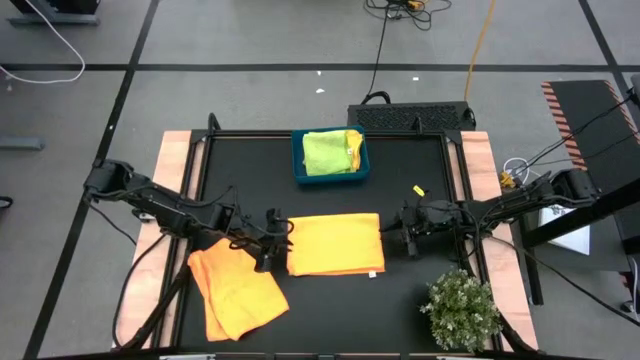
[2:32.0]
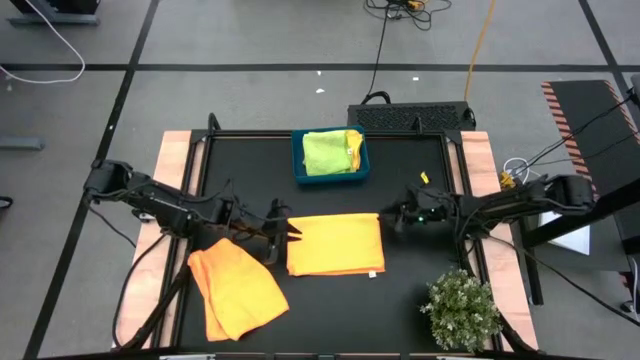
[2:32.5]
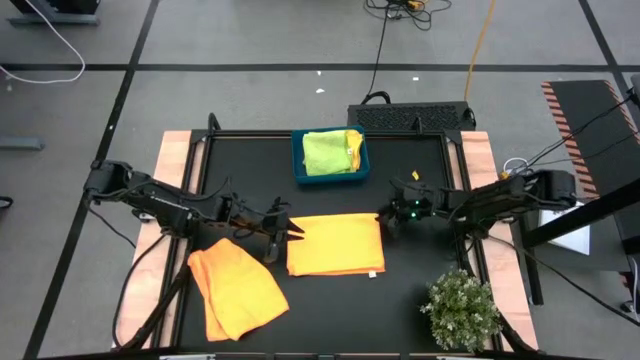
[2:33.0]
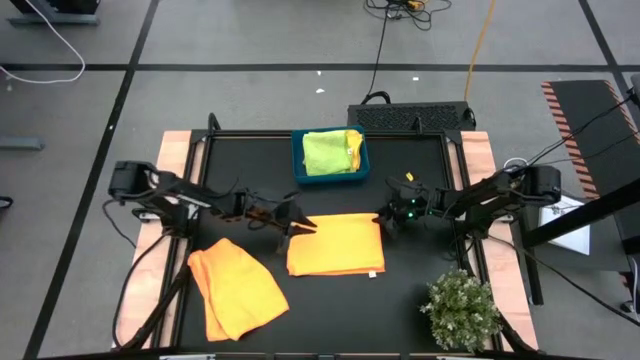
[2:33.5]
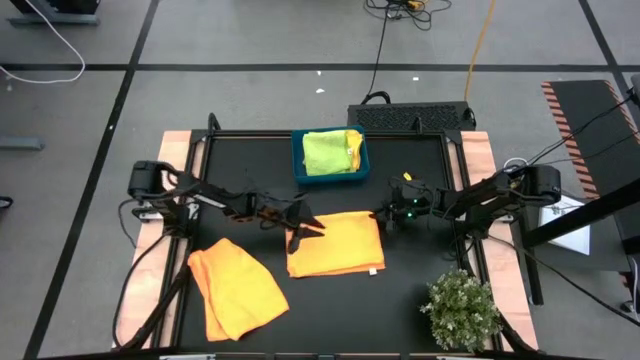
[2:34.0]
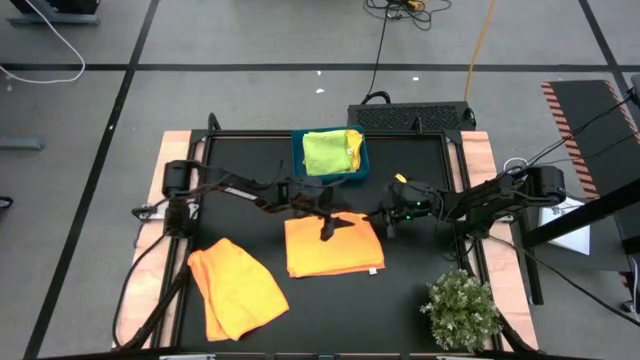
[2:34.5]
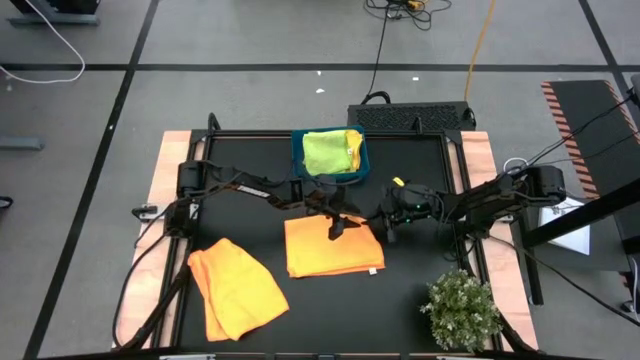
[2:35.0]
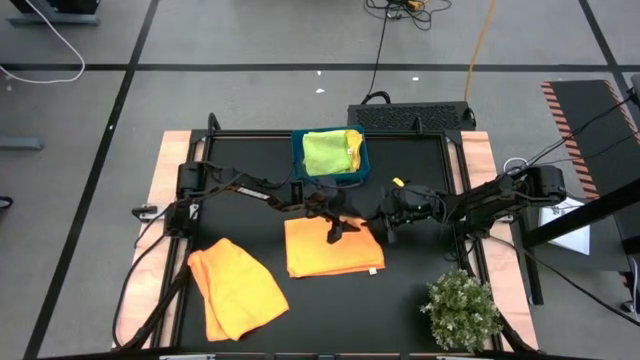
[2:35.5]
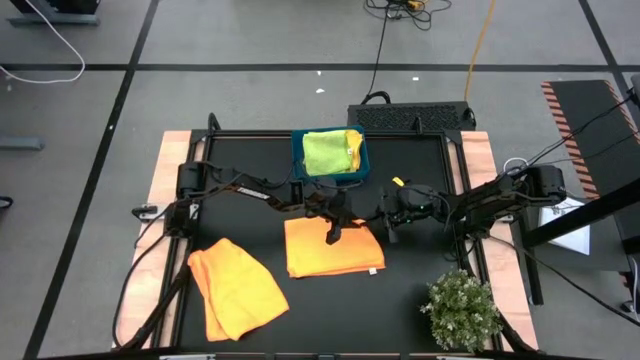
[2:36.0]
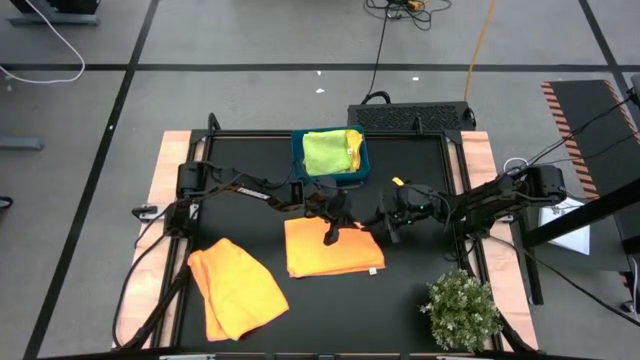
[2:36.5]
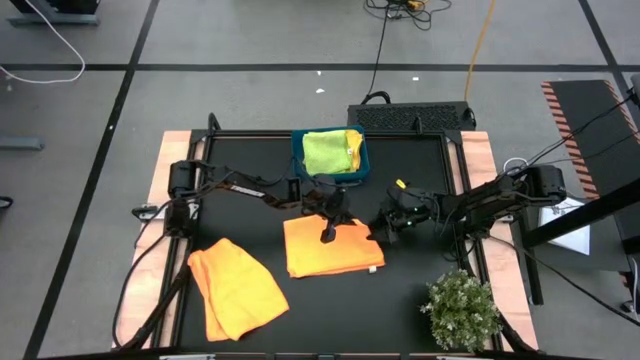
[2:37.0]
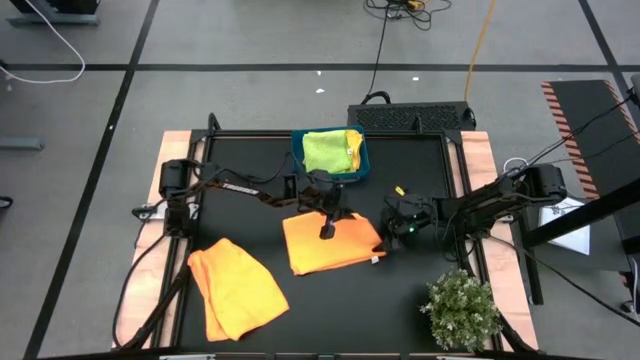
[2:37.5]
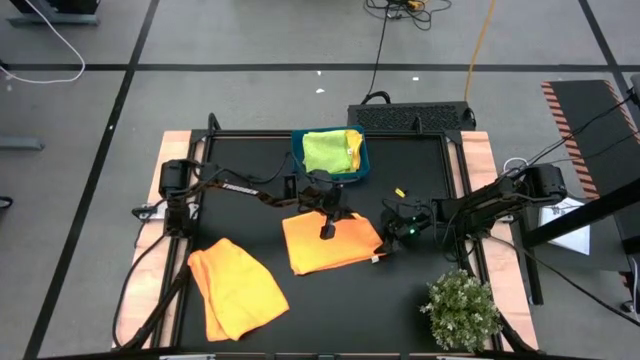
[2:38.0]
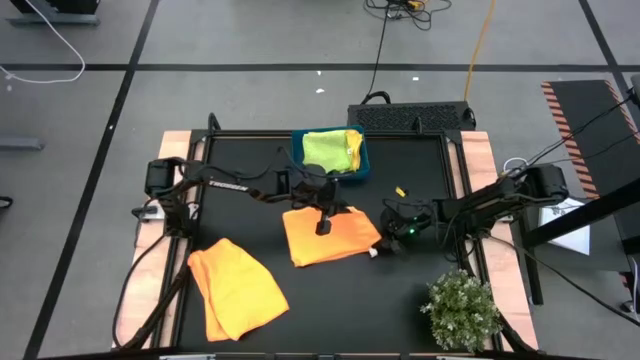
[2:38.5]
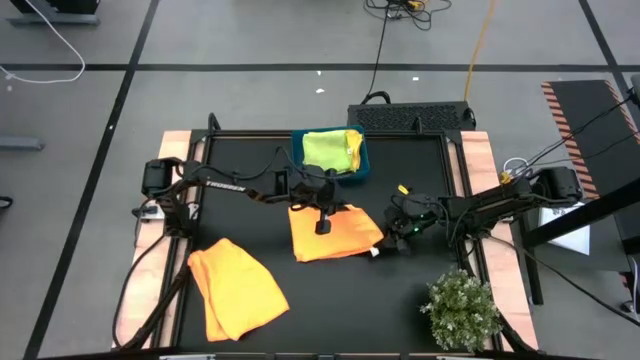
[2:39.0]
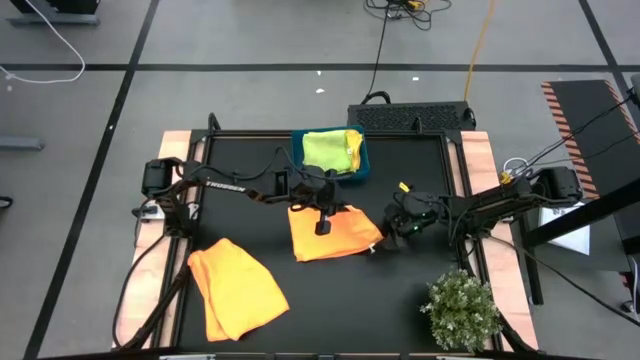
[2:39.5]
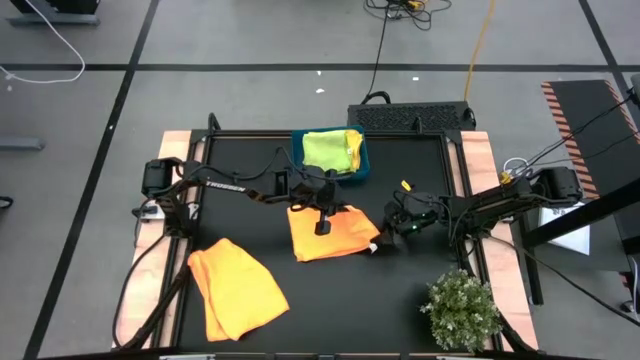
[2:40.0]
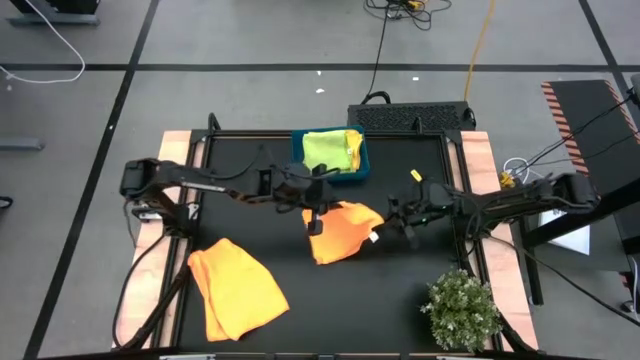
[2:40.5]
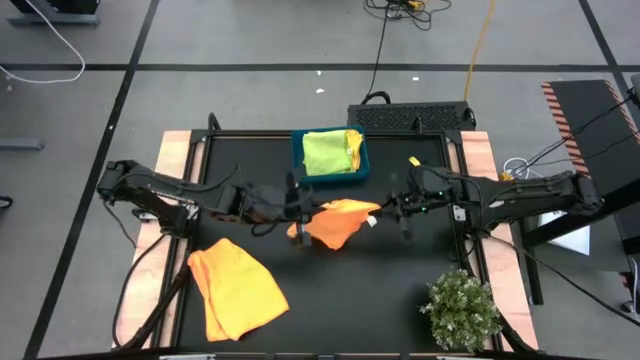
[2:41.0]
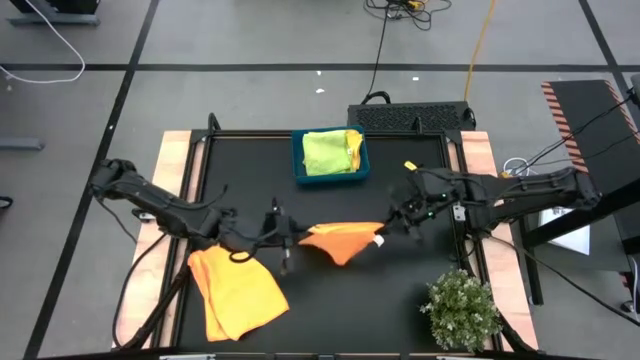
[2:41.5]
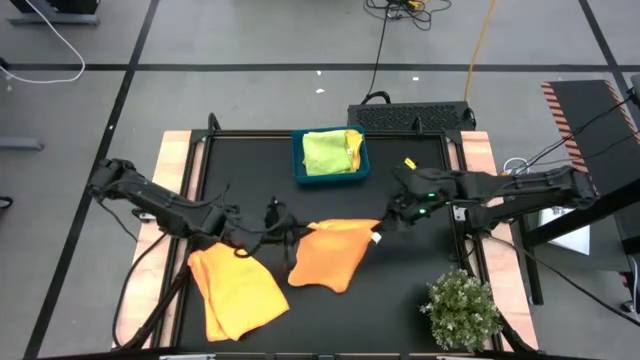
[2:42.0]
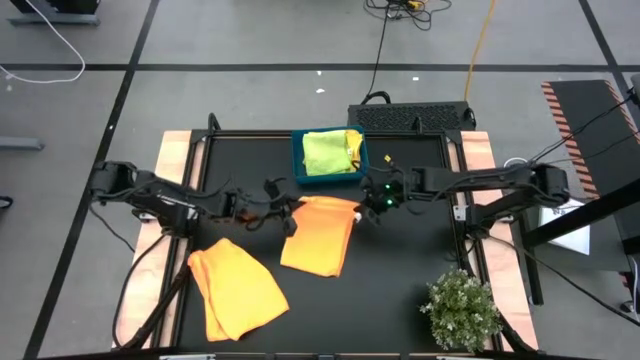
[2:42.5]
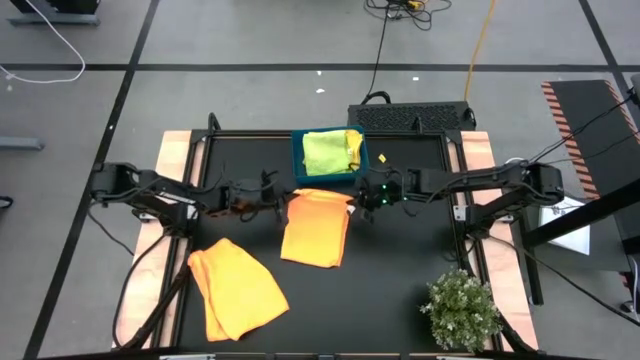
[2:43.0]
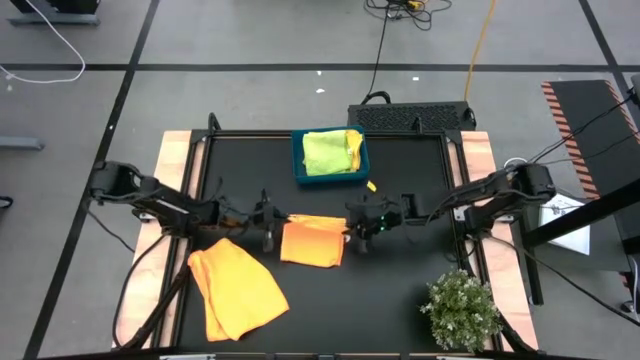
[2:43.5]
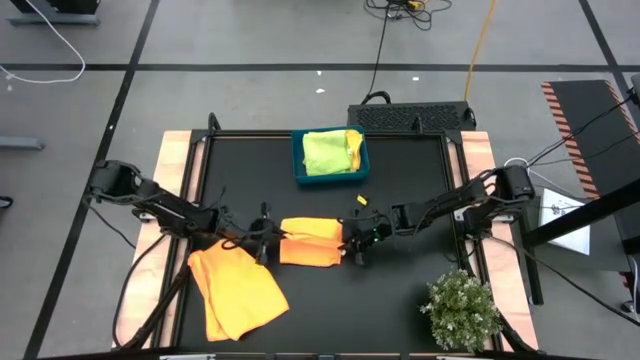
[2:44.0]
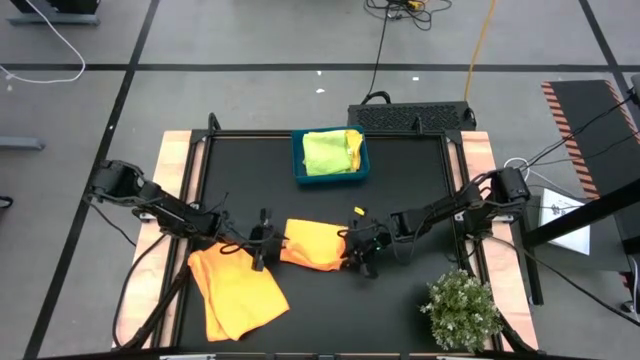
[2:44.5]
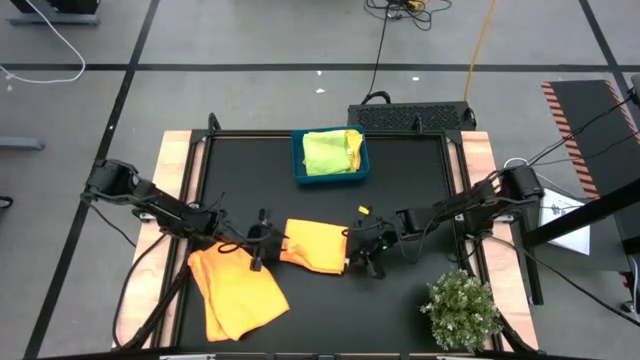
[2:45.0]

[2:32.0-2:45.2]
Task: Fold microfiber towels
Fold the right orange microfiber towel

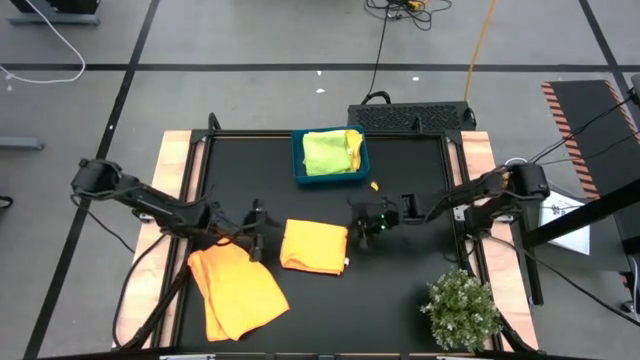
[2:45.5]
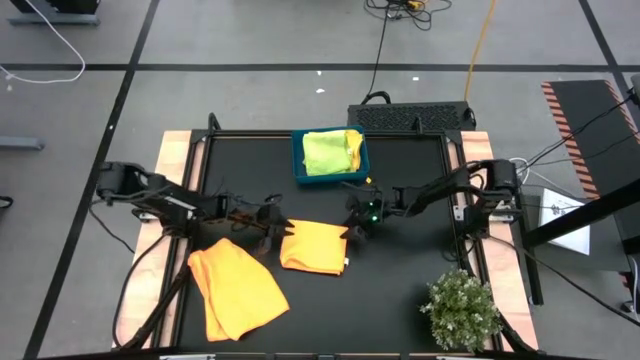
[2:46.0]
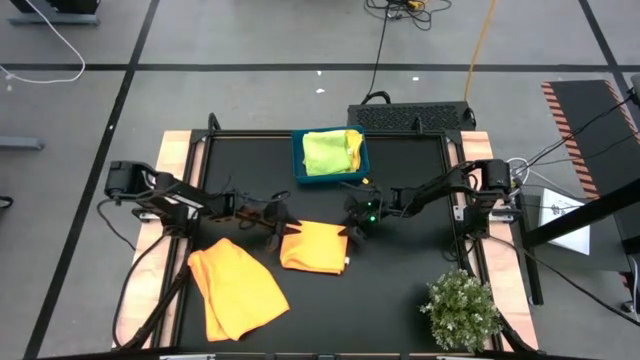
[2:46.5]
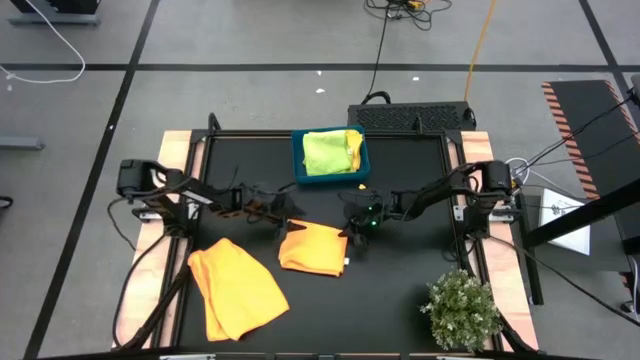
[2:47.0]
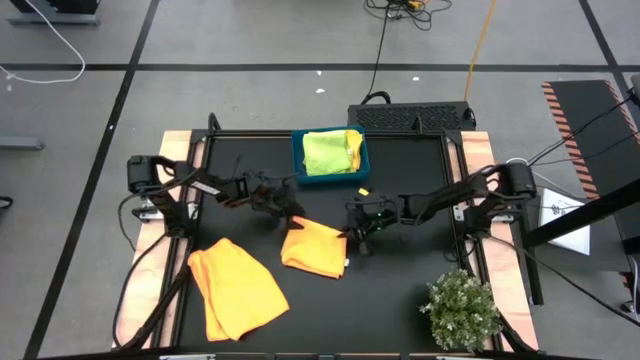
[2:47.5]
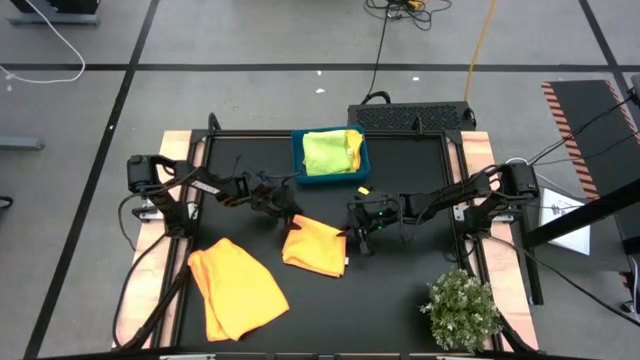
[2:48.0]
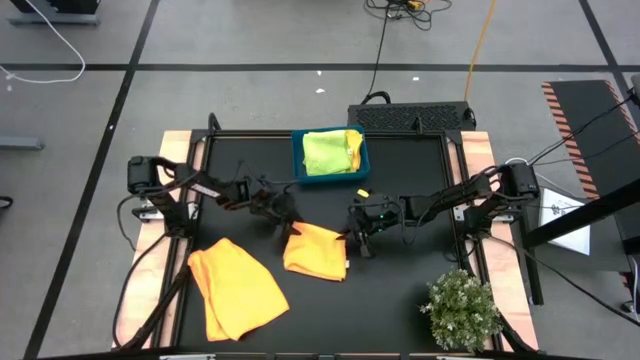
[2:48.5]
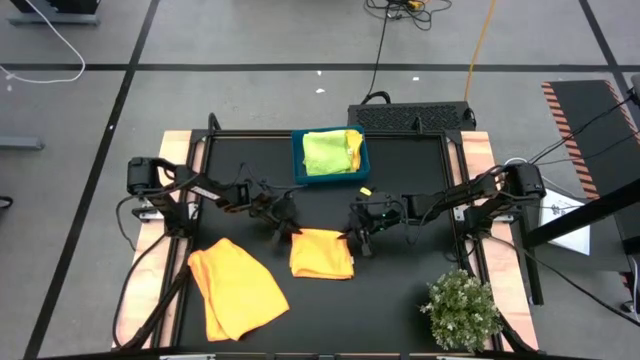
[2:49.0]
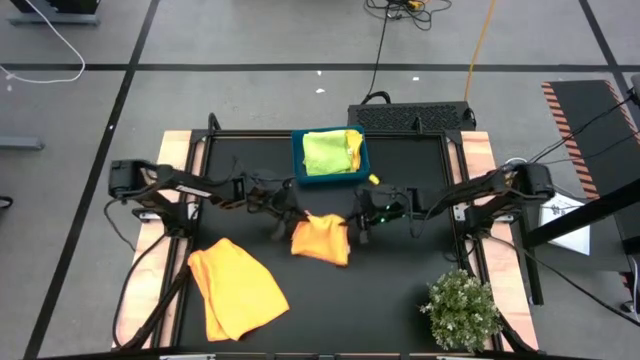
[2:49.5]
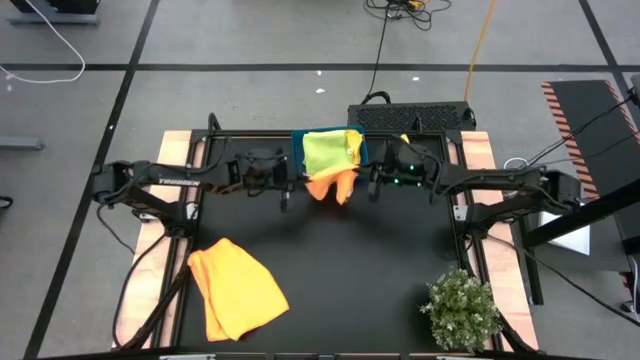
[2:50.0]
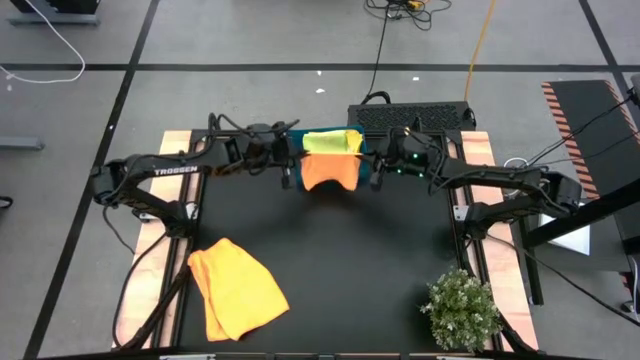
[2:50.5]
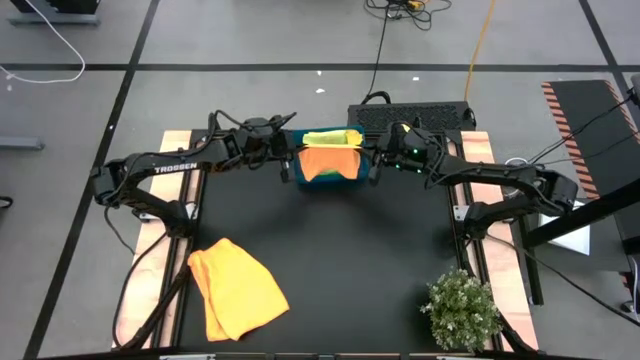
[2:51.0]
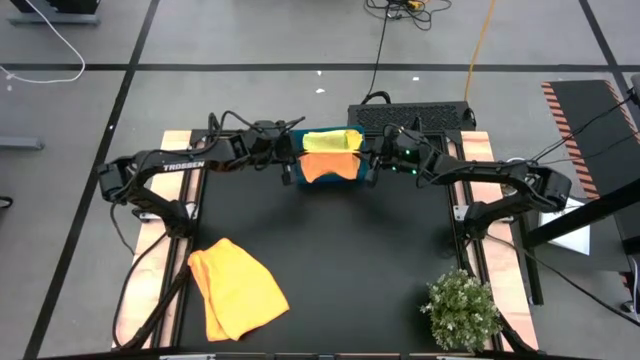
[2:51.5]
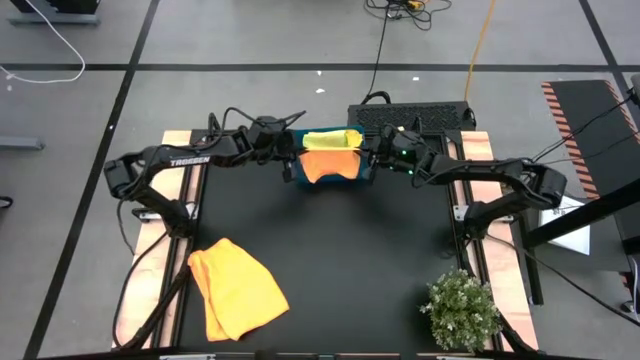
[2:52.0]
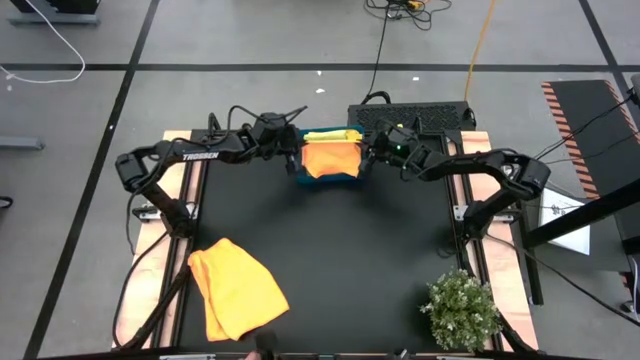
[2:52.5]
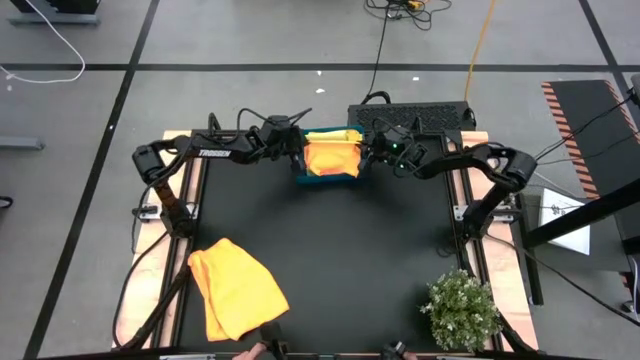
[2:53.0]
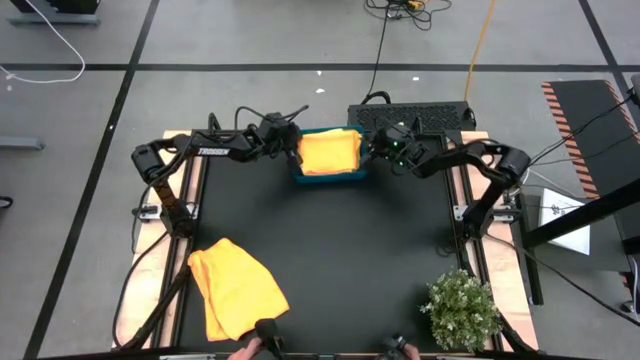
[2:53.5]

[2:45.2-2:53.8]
Put the folded orange microfiber towel into the blue bin

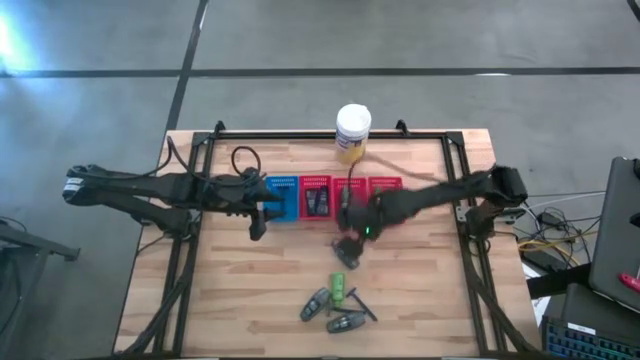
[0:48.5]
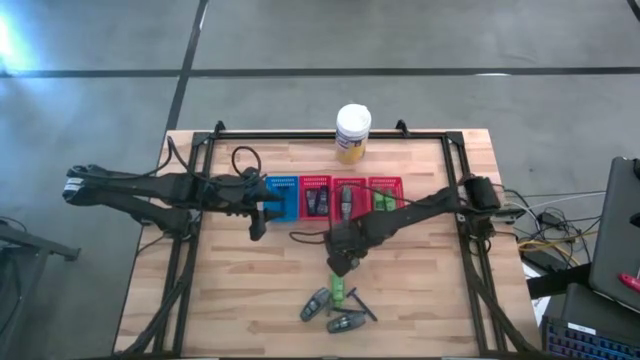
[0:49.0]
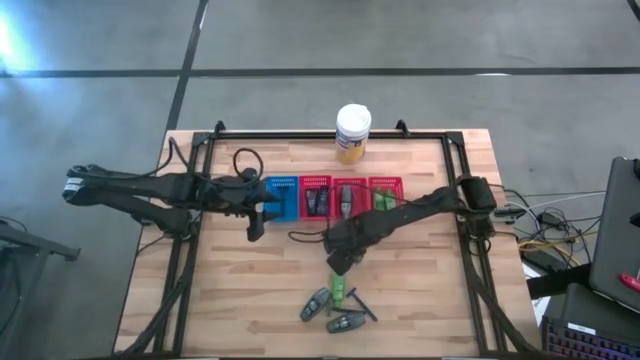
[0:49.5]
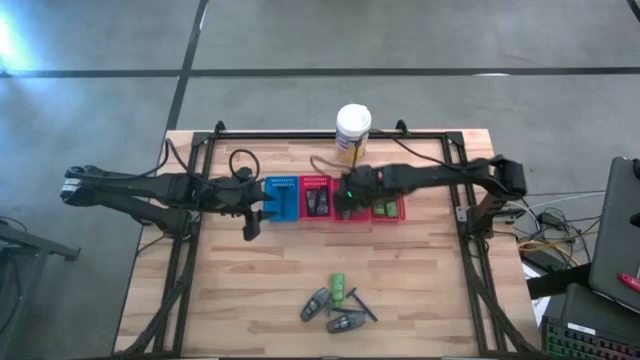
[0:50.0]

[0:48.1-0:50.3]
Task: Pick & Place Travel size toiletries
Put the black deodorant into the middle red bin
